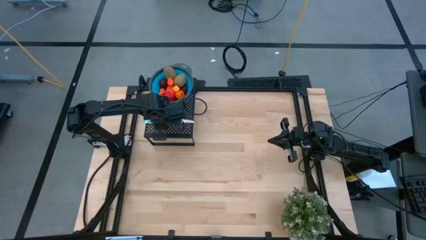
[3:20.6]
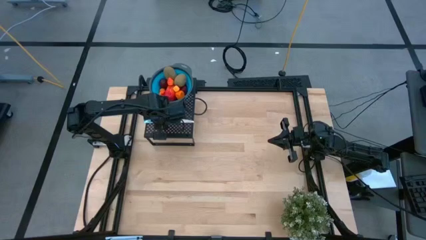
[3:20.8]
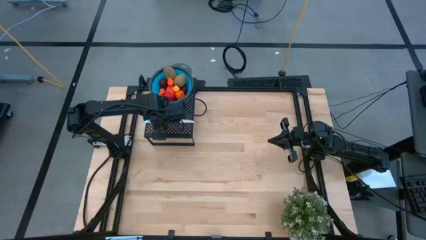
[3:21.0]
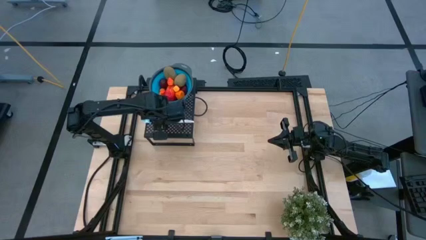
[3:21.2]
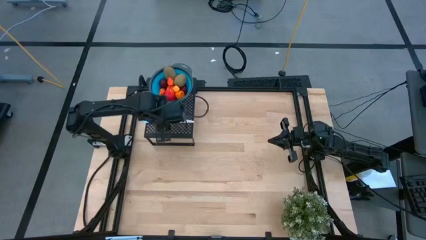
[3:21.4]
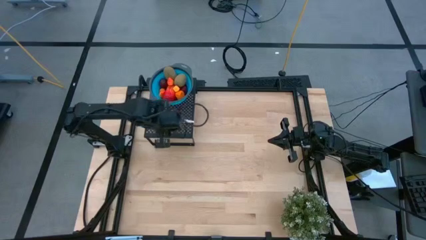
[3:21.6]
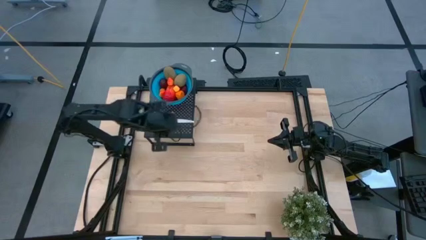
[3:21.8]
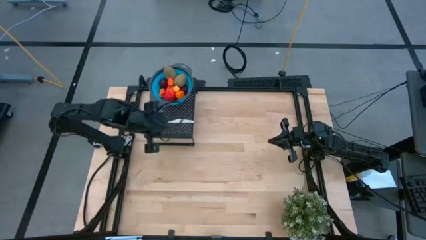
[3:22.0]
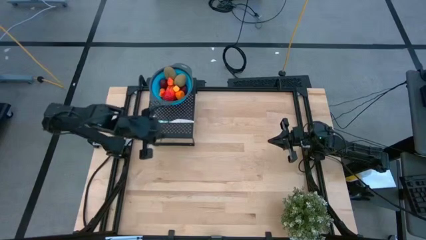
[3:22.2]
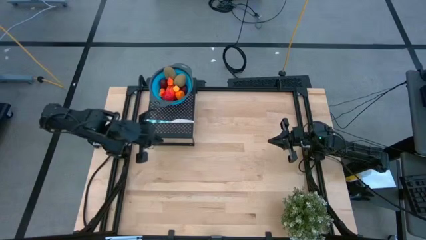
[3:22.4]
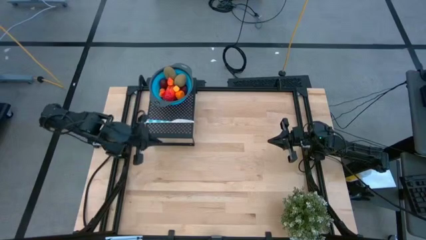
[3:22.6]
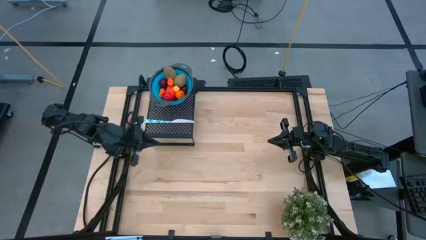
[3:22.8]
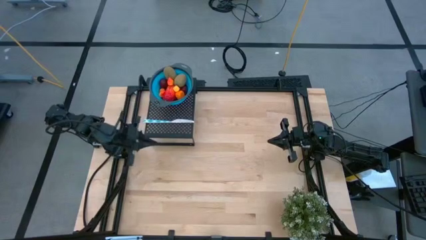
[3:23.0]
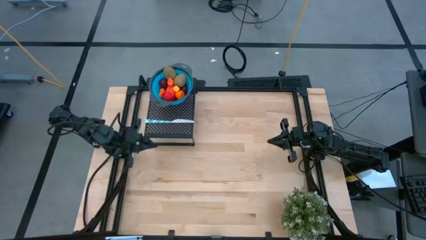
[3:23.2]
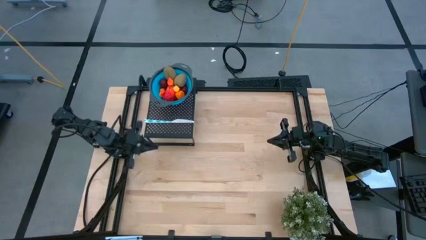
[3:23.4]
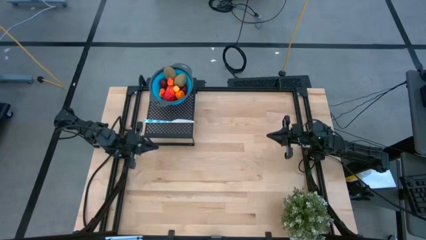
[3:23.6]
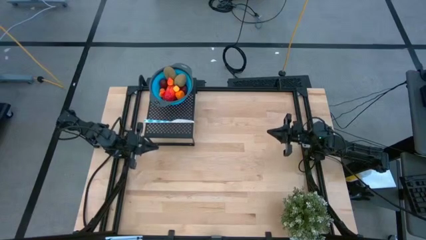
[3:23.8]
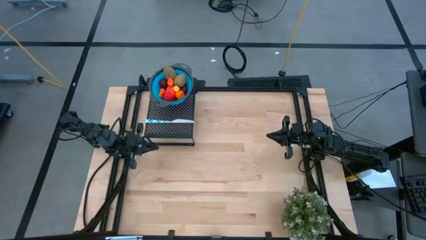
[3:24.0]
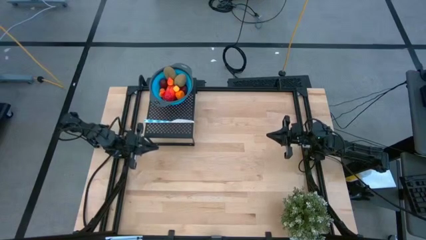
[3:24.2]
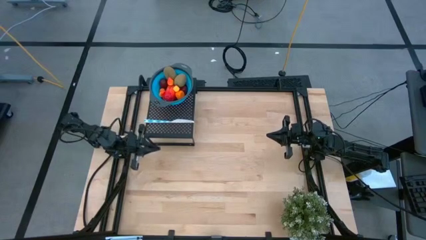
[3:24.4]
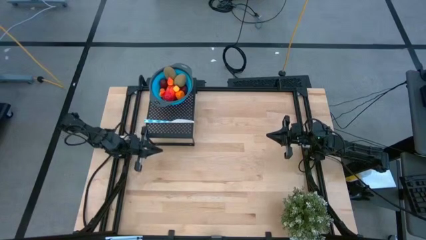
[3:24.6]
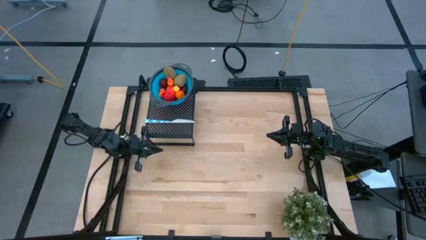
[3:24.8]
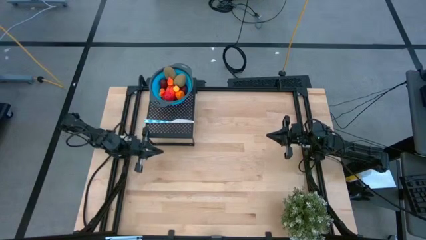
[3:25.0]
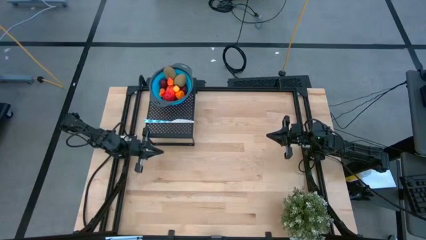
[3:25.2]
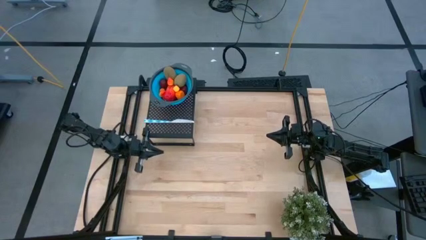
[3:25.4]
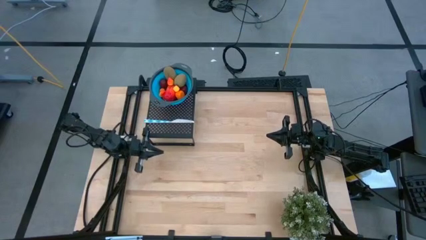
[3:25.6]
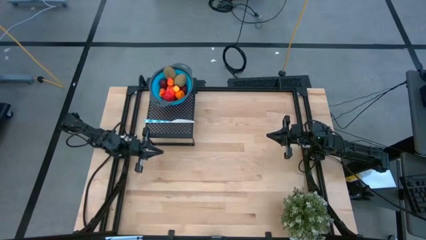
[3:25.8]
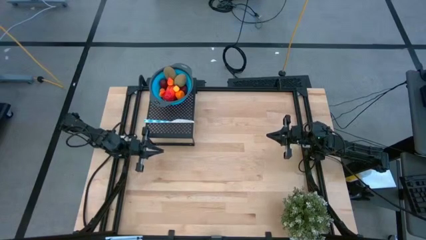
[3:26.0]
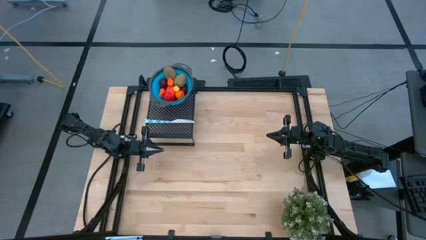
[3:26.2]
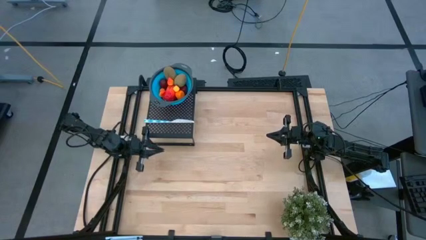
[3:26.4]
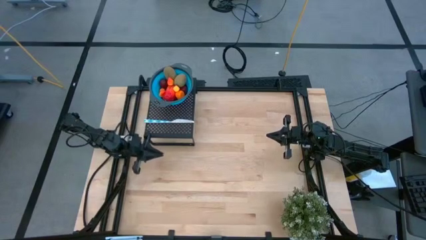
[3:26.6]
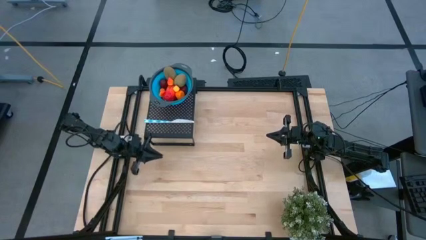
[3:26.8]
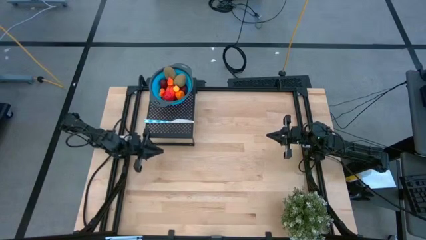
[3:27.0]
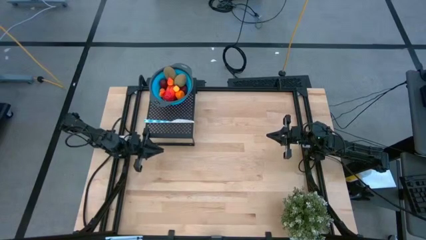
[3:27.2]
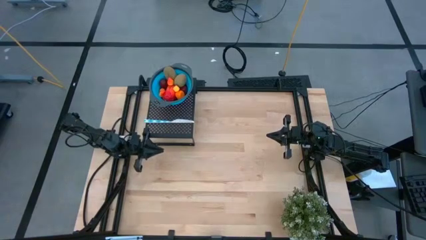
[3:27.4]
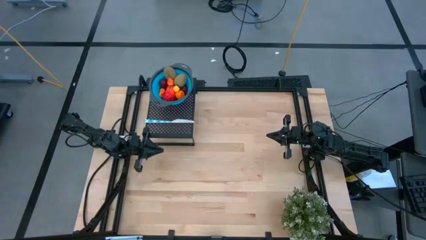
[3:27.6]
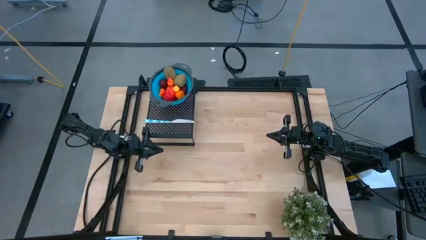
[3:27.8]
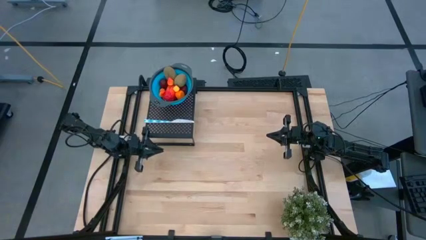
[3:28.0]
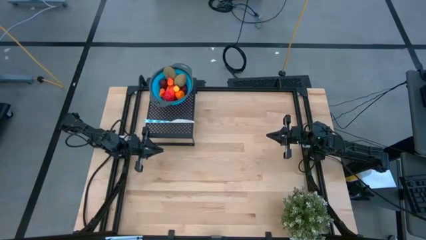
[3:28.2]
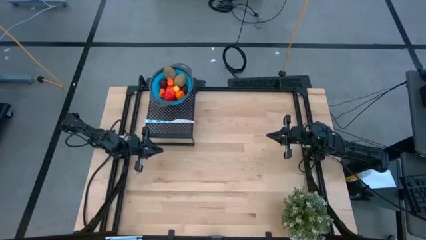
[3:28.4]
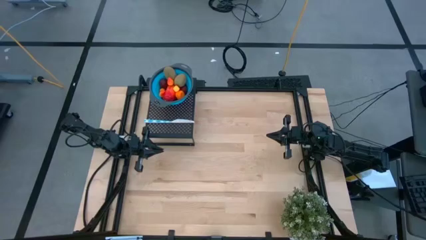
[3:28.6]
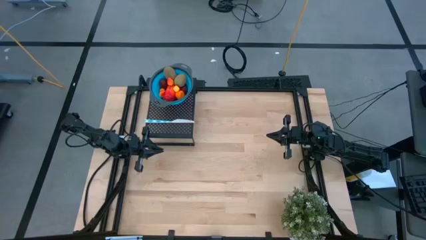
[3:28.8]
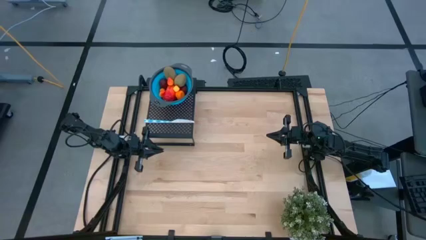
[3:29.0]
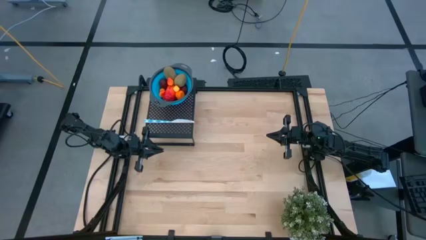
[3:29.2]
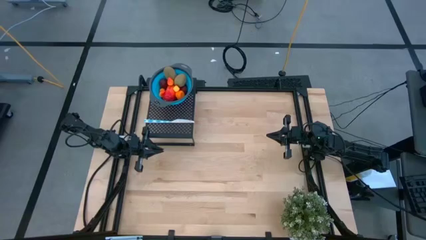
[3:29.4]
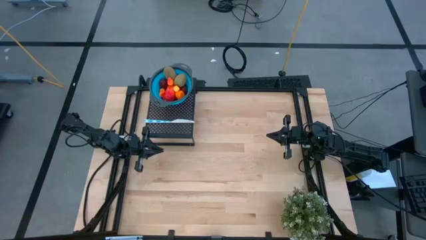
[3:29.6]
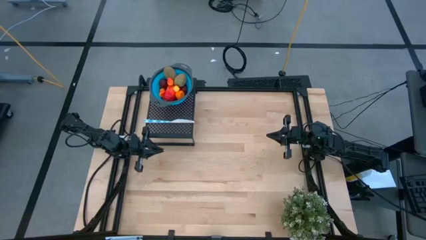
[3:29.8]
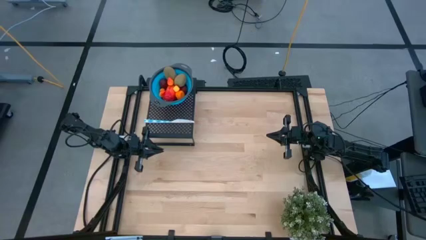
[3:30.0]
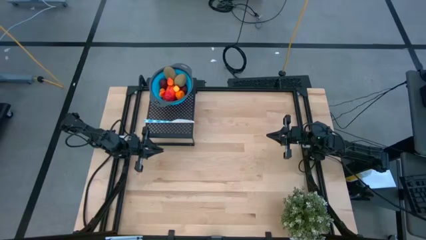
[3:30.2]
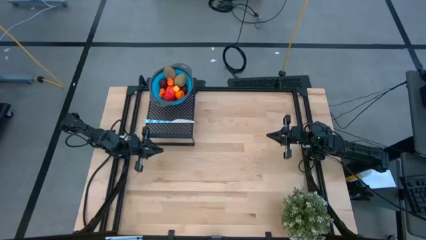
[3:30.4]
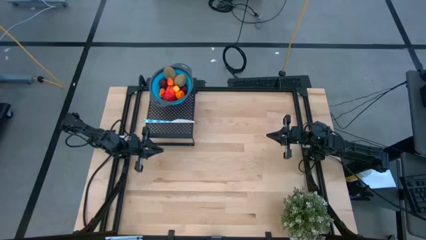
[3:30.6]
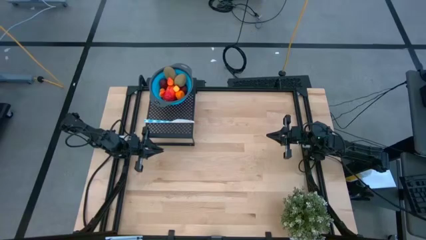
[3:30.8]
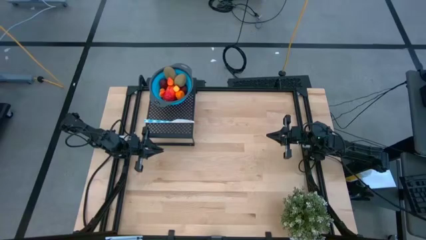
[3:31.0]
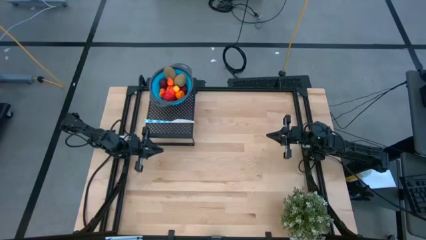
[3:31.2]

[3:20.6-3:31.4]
Task: Pick & Place Fruit
Return to Home Position

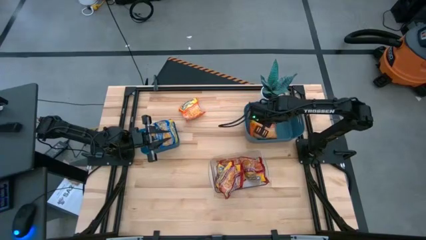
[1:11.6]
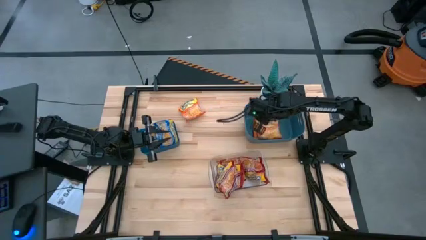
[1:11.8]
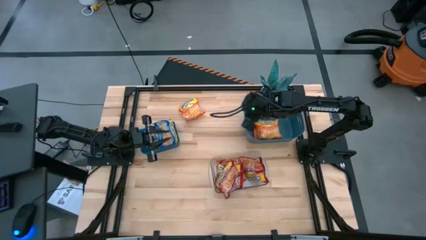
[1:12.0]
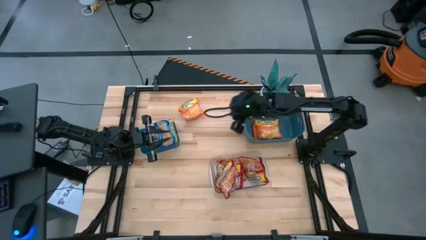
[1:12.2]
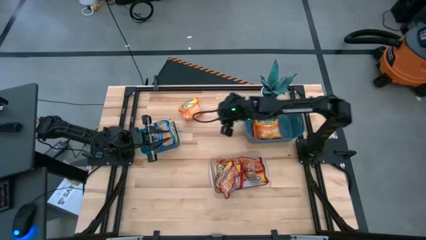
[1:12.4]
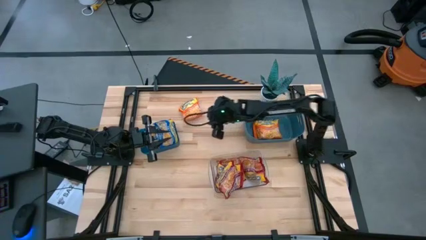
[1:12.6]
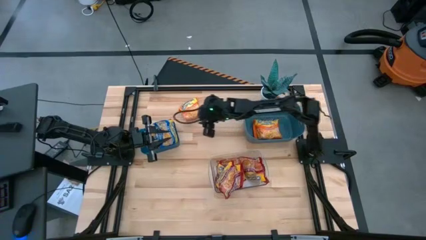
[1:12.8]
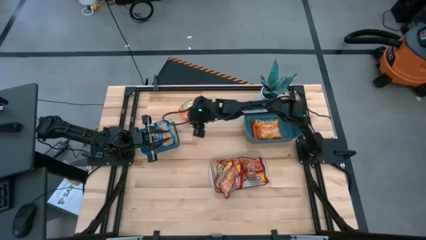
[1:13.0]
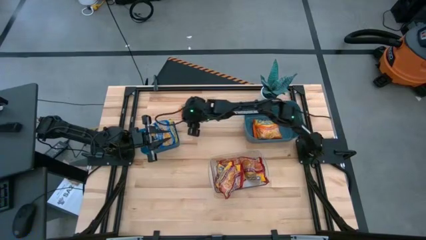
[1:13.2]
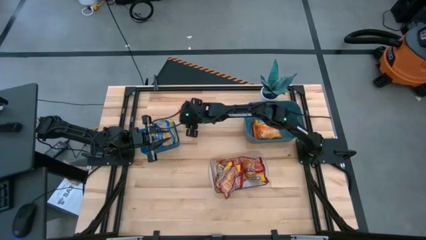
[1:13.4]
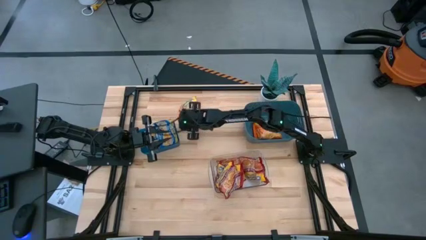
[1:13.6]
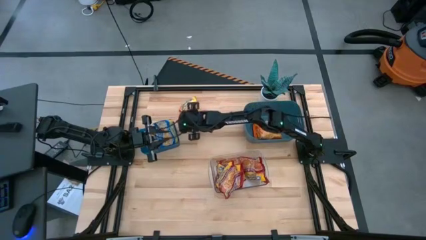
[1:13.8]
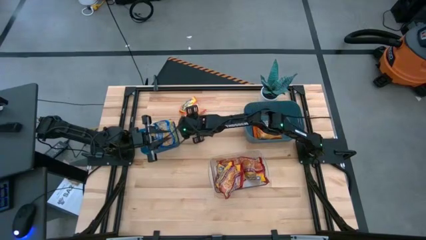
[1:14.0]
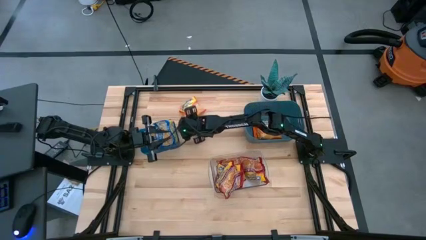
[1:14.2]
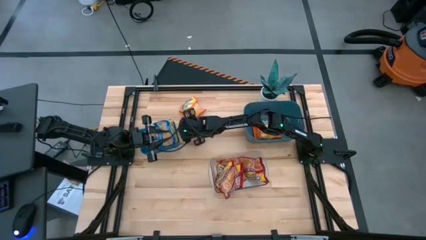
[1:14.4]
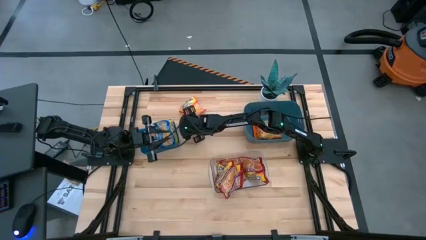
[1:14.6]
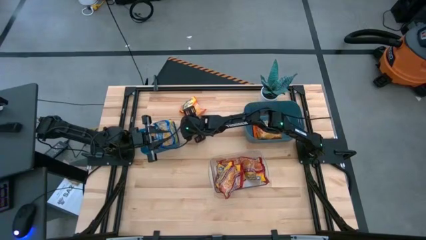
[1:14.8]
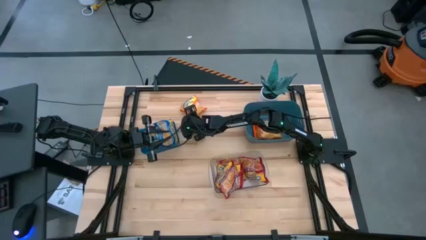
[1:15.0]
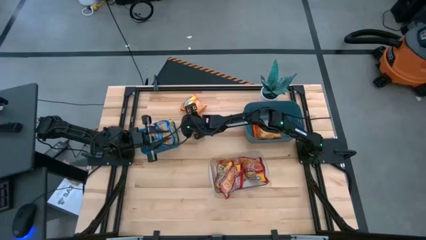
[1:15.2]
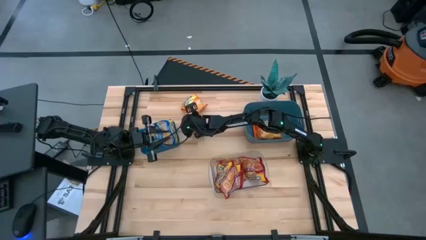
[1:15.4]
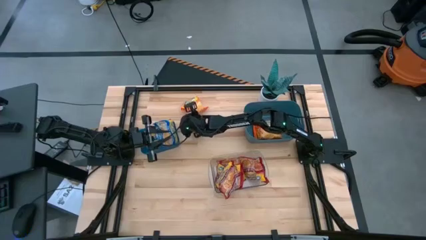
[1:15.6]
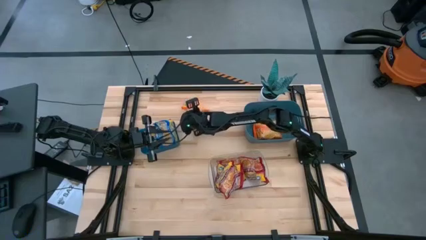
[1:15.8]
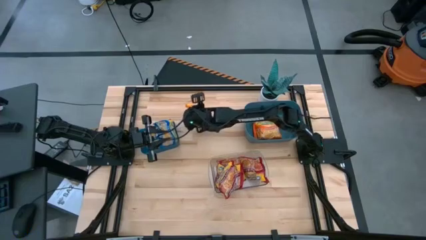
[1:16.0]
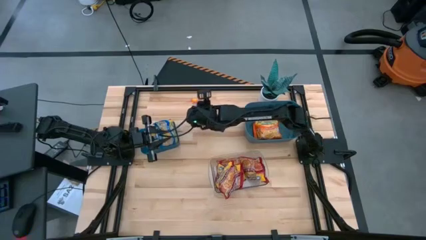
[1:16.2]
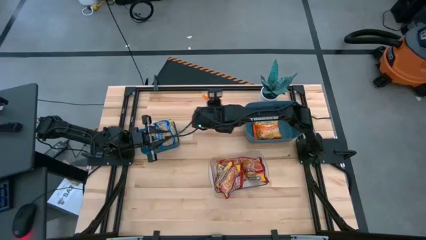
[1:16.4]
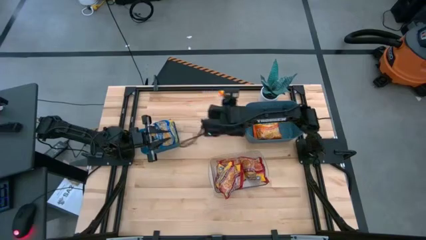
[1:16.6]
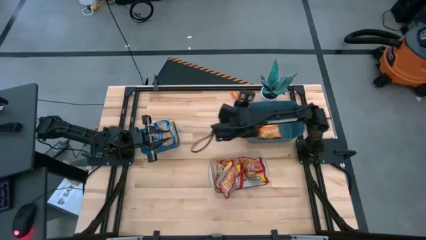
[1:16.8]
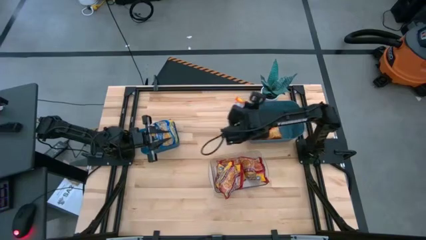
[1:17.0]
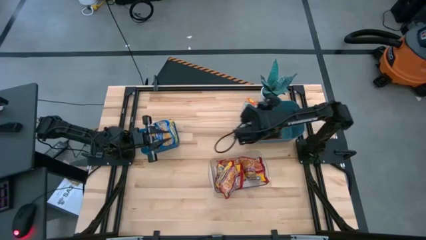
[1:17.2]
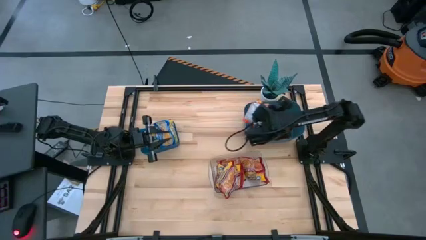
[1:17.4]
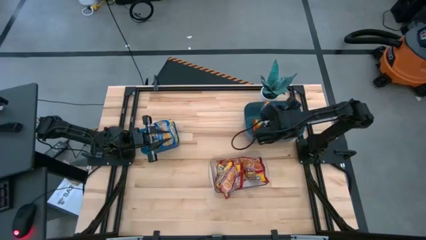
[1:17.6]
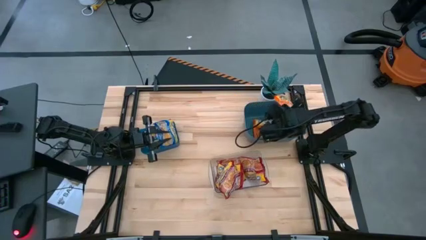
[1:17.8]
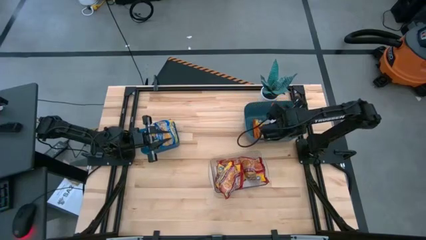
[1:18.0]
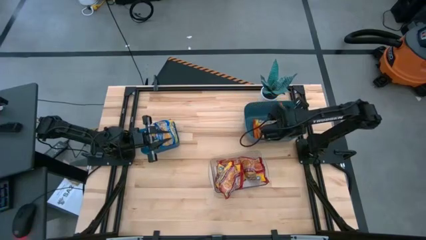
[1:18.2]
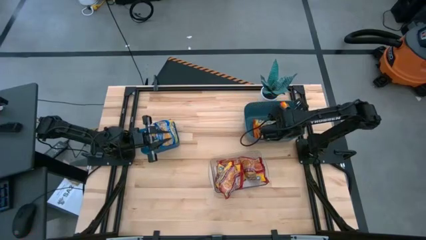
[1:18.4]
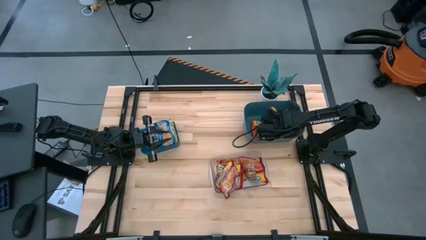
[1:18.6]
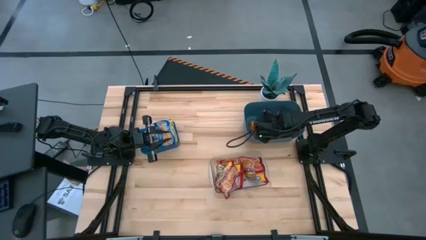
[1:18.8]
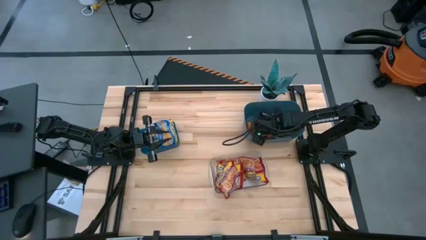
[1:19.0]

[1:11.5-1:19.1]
Task: Sort Maruchan noodles
Put the orange noodle pack into the green bin
